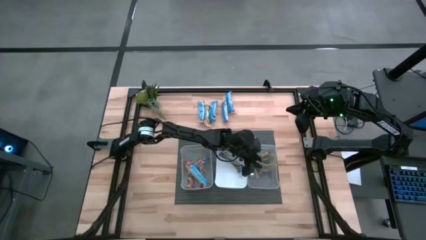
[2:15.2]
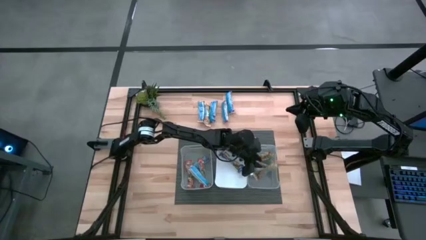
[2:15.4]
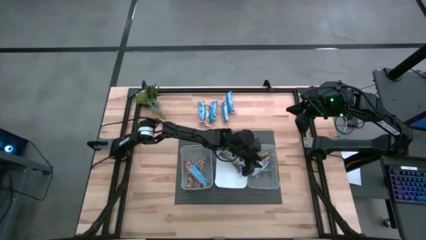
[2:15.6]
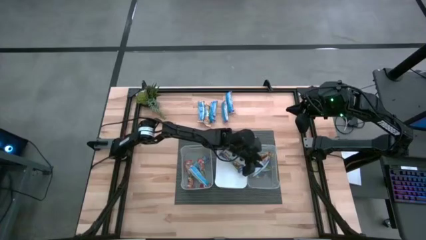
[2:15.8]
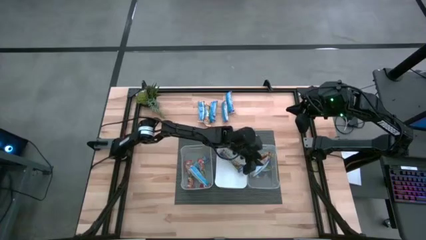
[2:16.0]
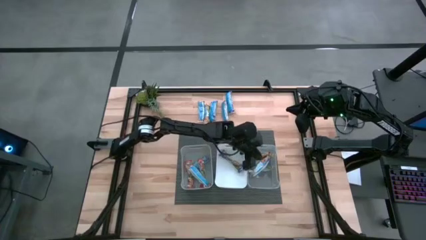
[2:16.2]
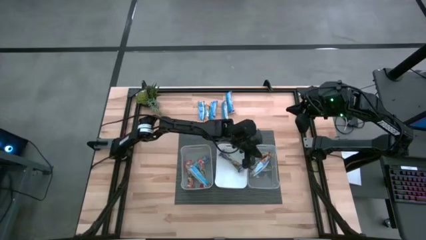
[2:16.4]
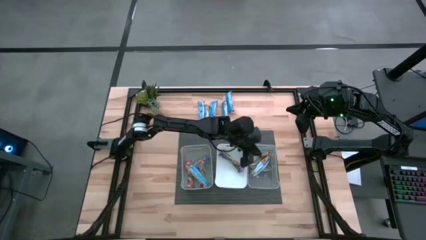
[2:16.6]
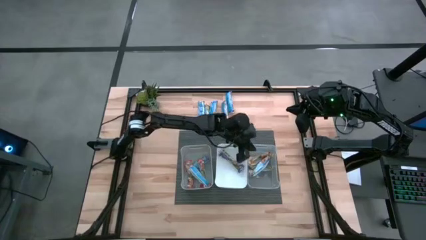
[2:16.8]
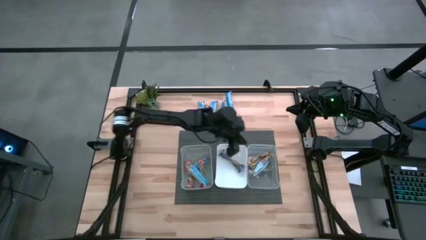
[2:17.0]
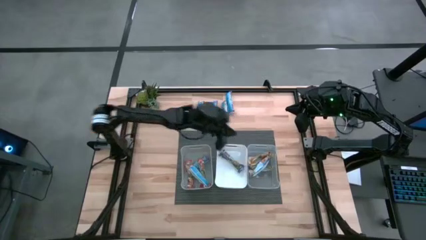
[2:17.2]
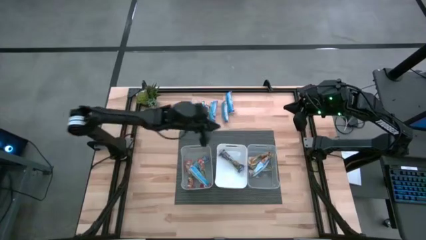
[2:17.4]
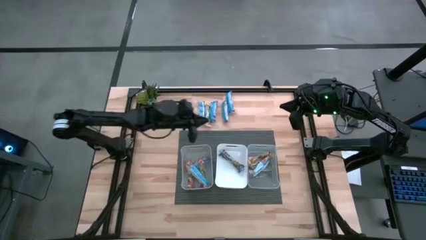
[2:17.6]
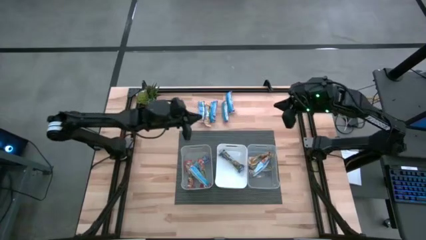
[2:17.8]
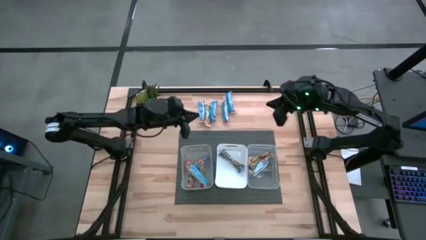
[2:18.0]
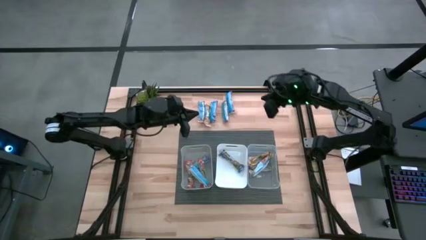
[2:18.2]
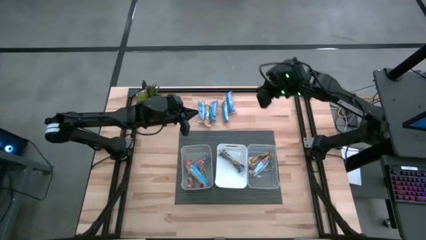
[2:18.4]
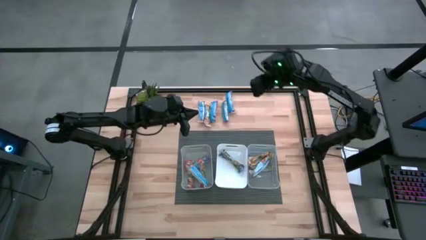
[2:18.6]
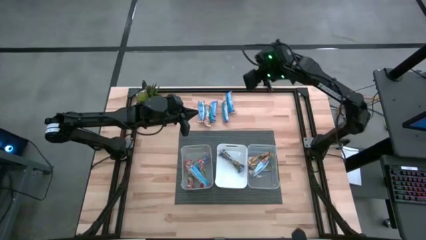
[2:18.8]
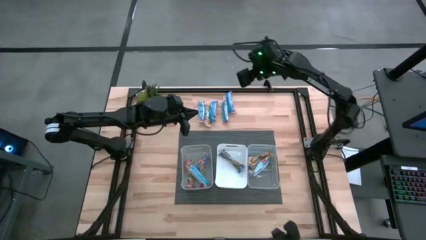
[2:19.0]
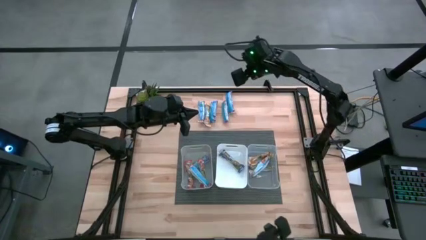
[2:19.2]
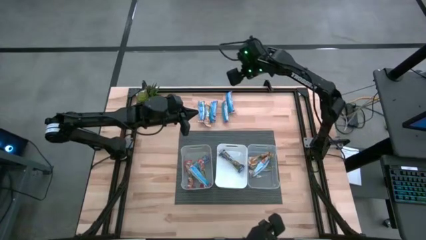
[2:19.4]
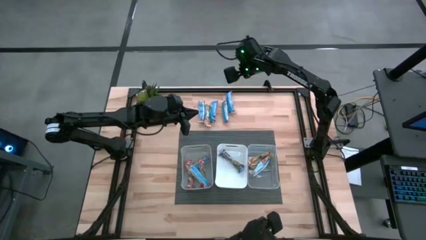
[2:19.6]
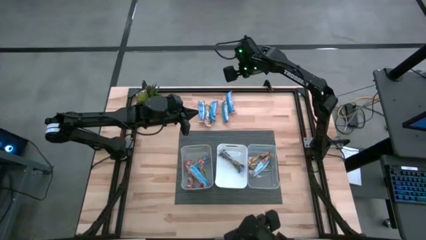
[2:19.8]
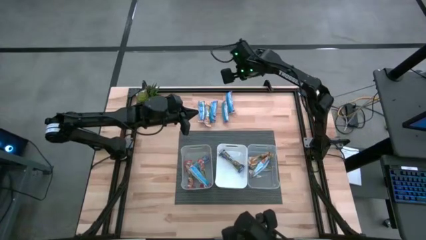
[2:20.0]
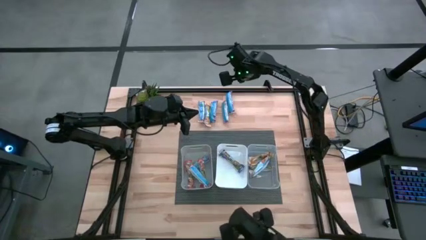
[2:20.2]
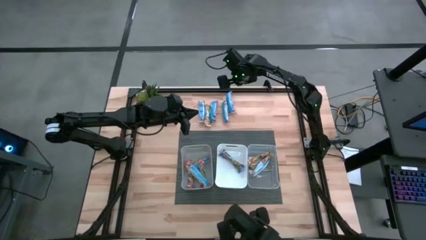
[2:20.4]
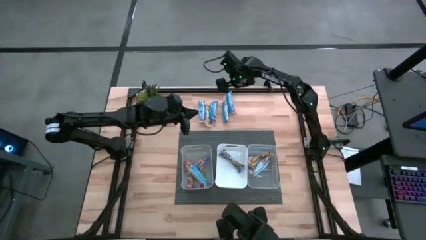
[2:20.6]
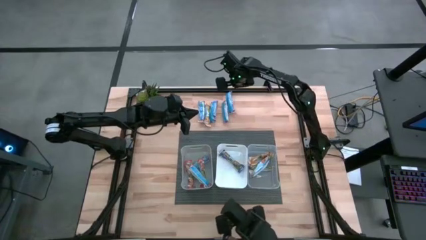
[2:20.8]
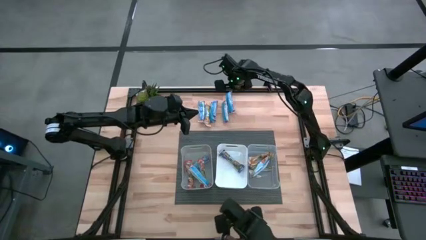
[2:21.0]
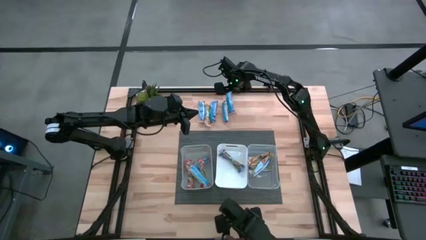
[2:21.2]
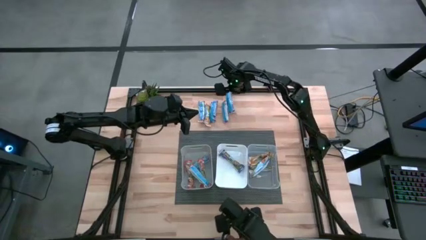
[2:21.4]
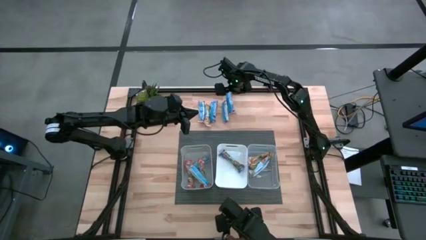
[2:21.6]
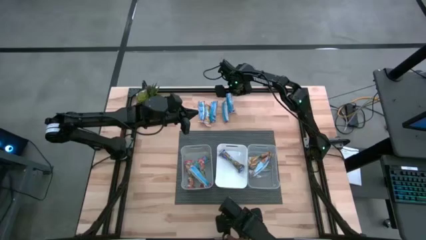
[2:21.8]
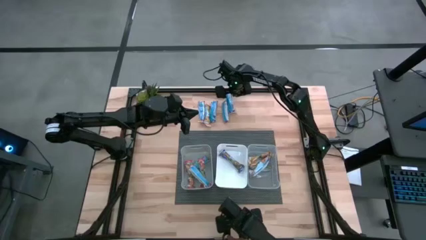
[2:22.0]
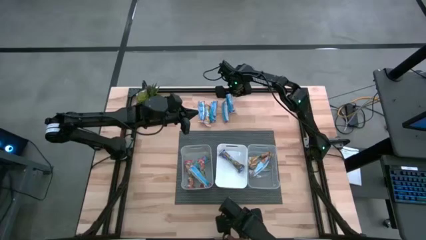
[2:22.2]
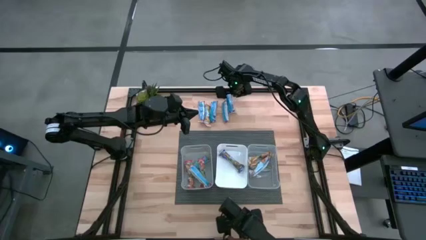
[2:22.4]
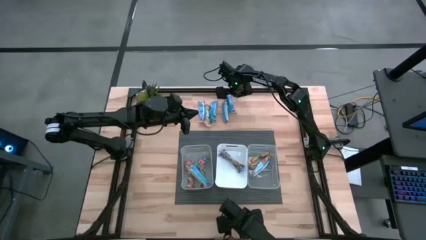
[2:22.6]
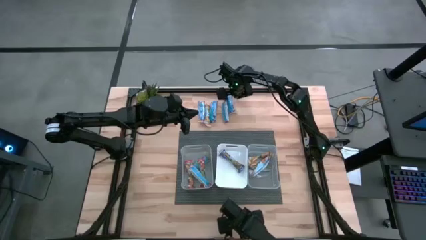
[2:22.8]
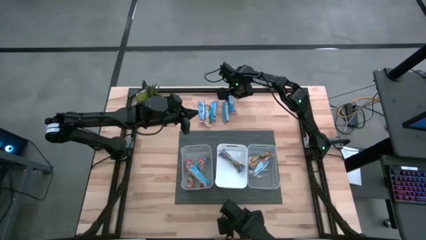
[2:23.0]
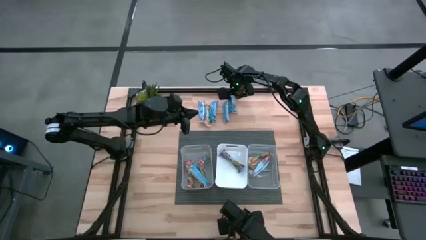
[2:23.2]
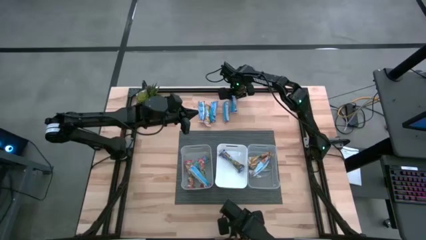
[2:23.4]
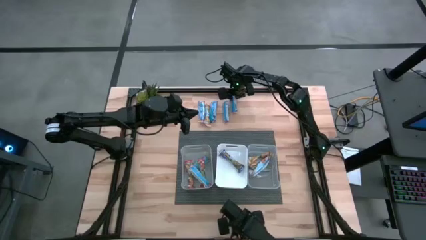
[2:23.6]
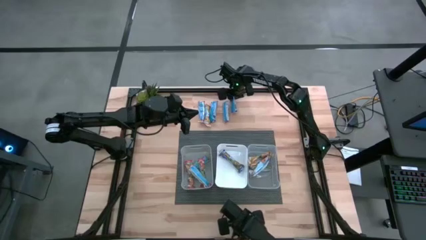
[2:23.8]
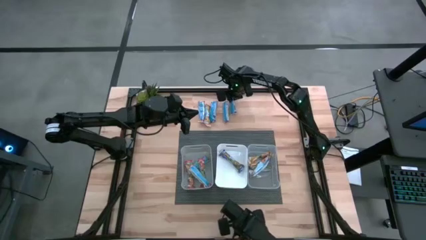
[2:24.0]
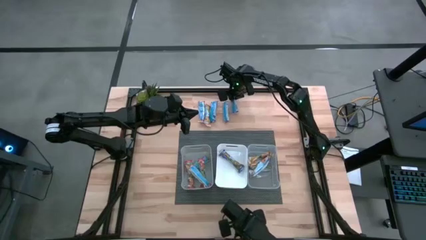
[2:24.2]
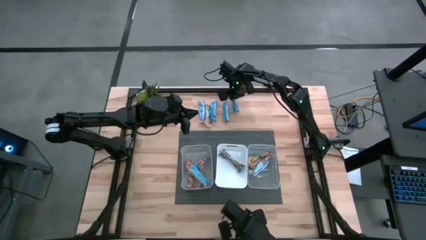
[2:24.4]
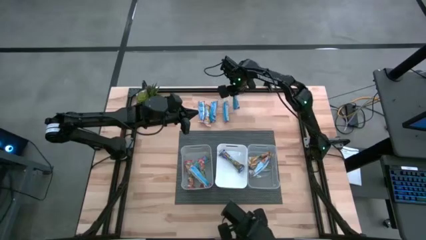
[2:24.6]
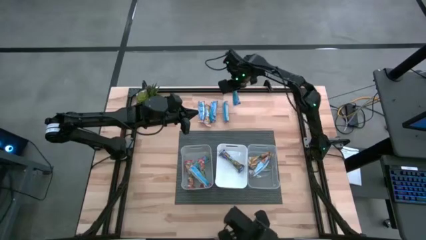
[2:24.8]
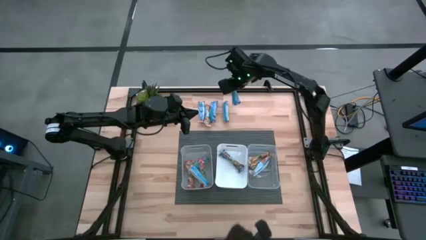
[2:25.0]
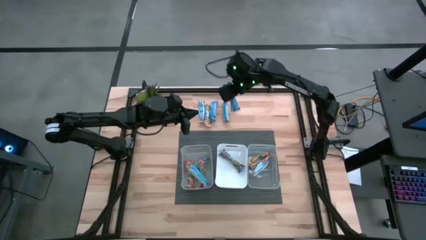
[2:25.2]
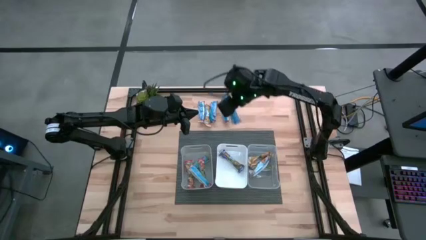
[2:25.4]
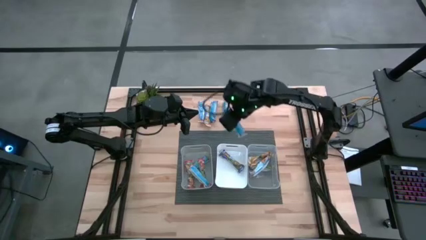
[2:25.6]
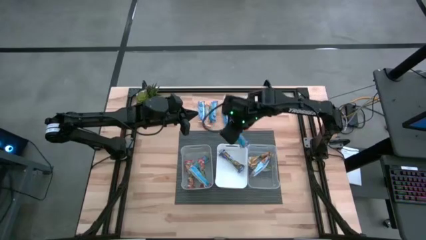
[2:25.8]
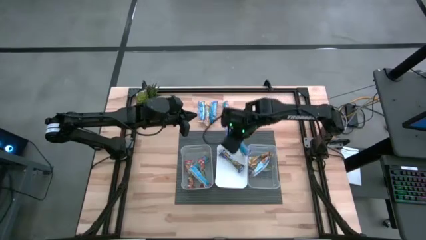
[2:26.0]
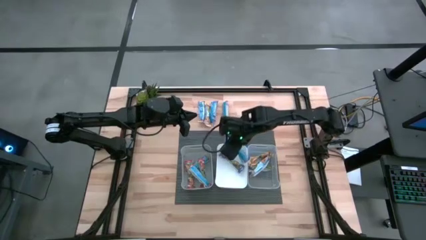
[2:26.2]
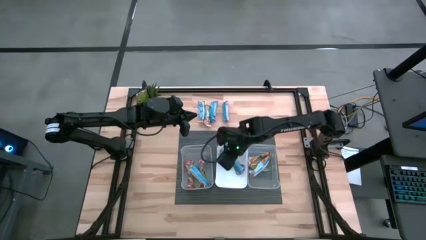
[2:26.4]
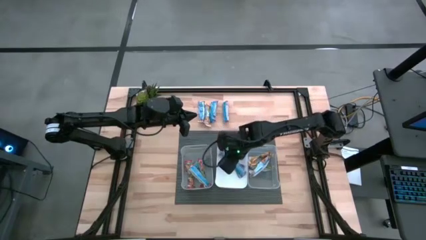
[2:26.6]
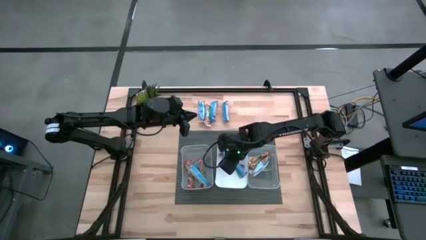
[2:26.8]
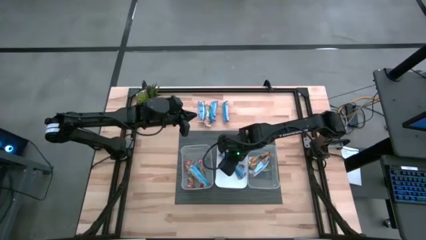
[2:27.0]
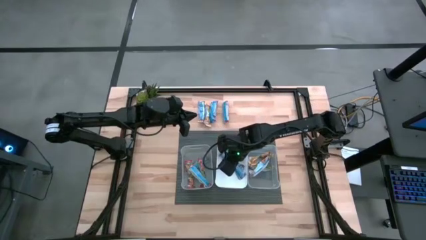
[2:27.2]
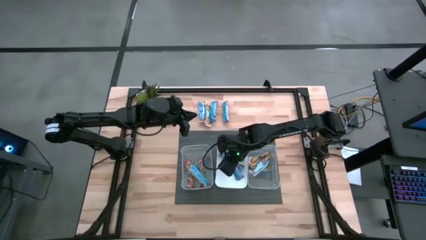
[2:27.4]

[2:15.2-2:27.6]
Task: Pick and place Granola Bars by type
Put the blue granola bar into the white bin

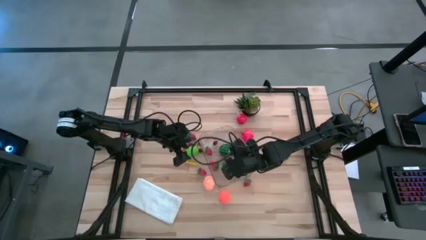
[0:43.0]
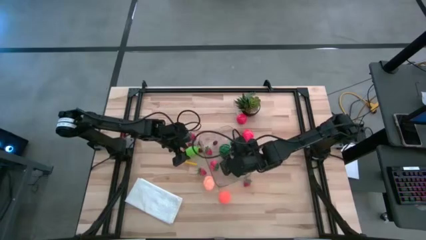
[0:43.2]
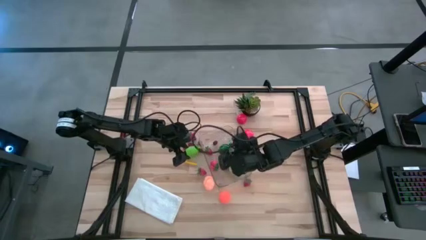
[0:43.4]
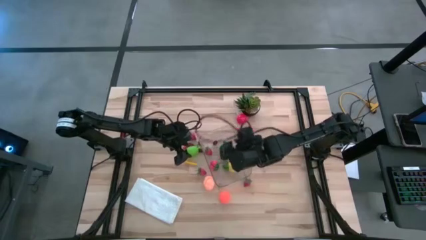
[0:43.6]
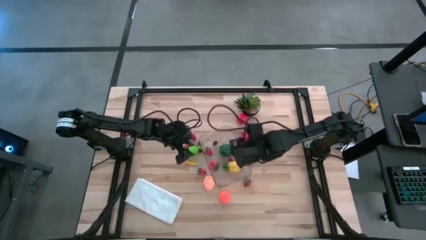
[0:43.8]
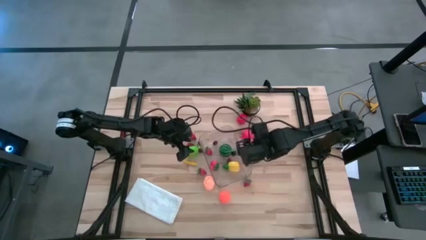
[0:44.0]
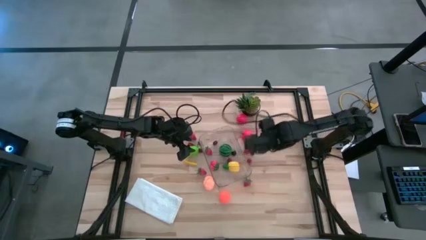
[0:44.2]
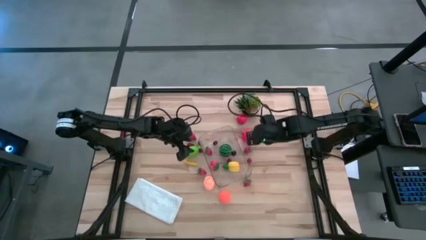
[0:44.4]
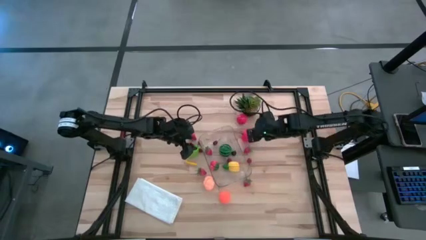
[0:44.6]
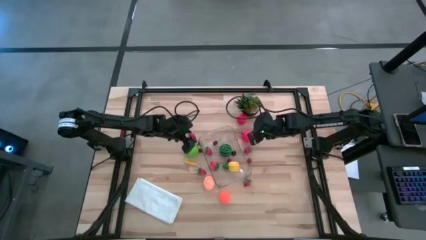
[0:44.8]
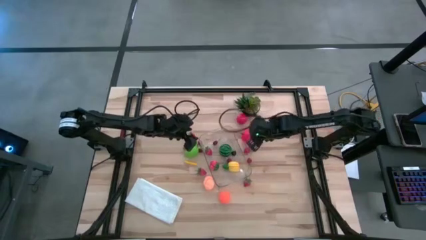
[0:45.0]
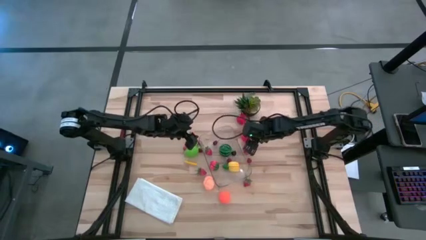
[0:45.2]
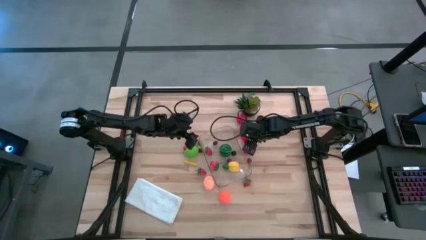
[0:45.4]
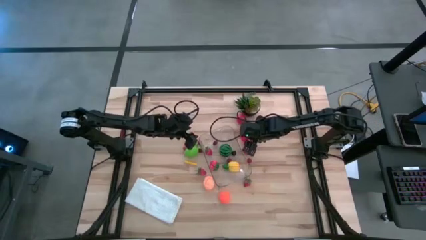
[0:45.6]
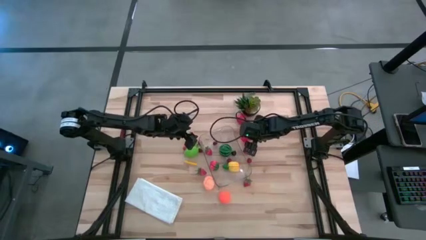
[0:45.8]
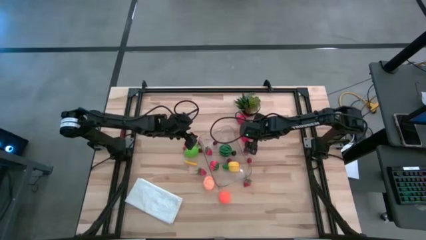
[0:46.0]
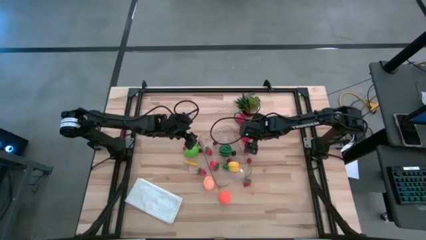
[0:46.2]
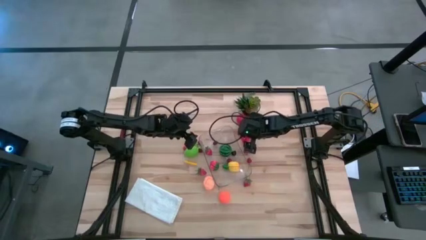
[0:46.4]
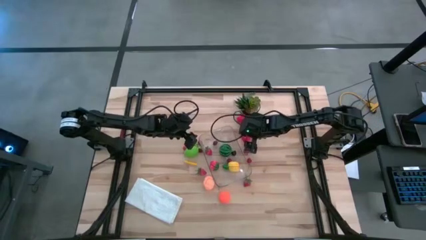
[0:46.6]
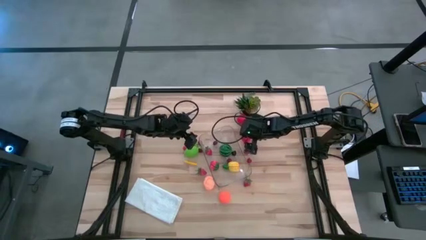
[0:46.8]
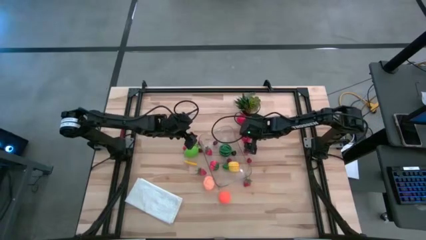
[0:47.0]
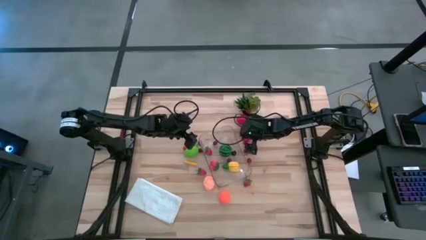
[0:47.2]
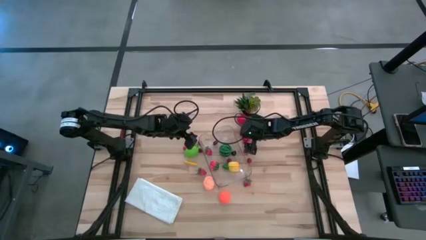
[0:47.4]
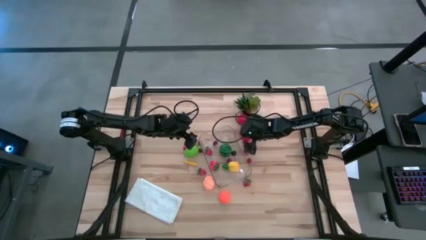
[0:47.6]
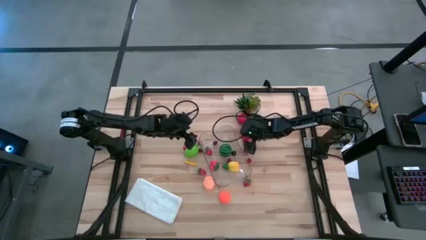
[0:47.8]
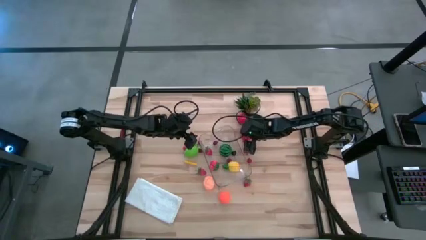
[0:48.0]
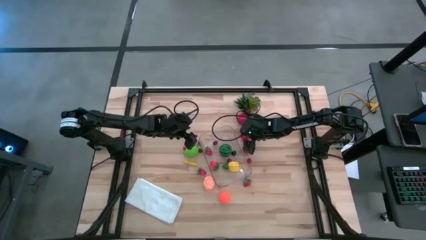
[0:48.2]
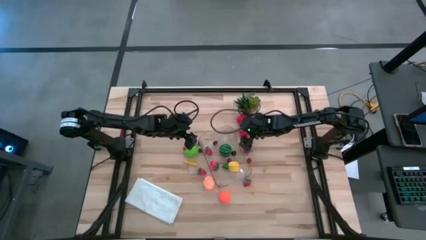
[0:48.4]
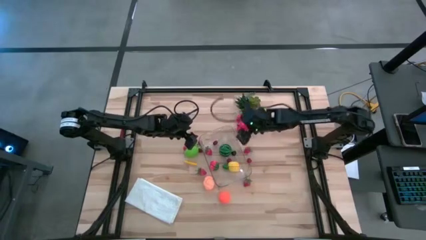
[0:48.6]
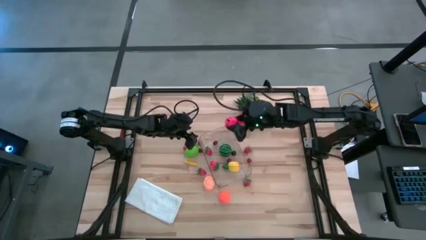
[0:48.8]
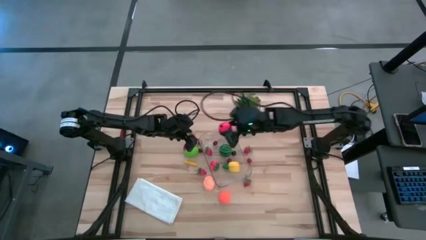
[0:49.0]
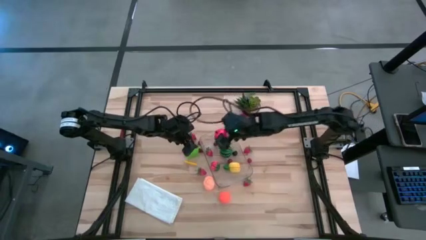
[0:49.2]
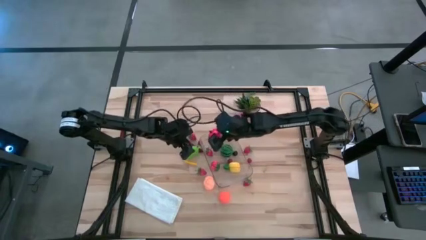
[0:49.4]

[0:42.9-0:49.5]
Task: Pick and placing Produce into tupperware
Put the red apple into the transparent bin
